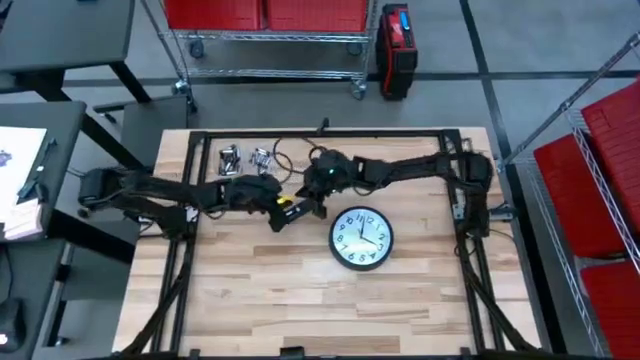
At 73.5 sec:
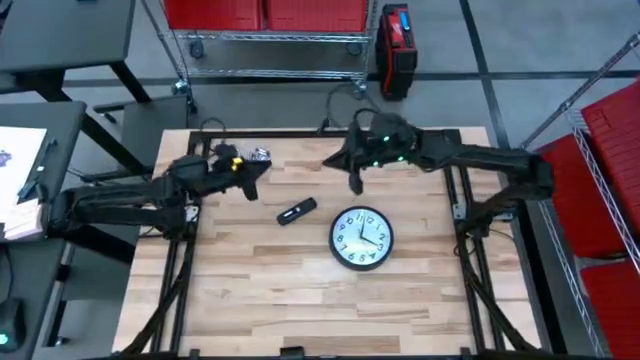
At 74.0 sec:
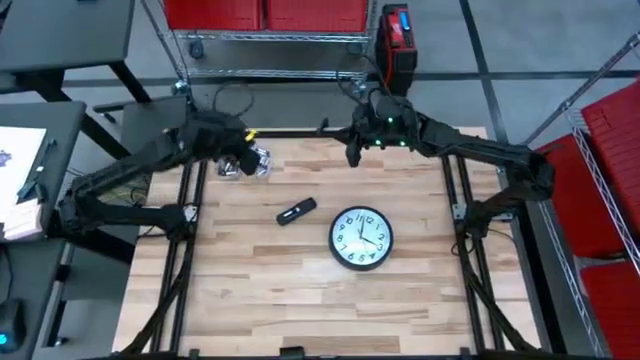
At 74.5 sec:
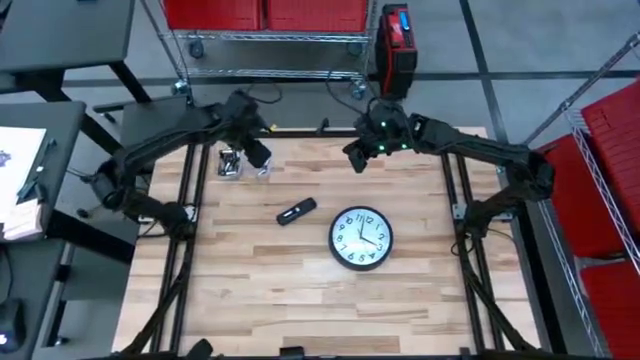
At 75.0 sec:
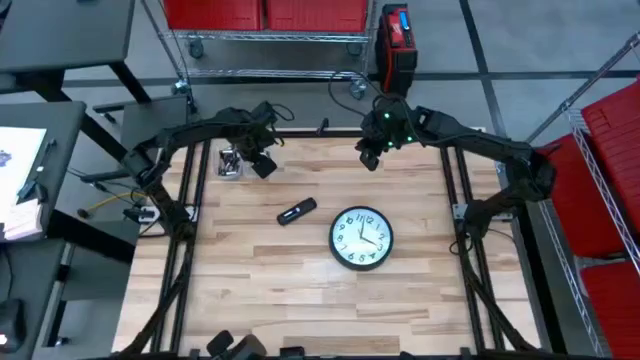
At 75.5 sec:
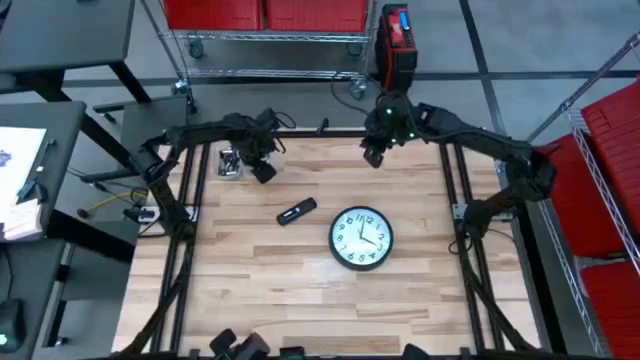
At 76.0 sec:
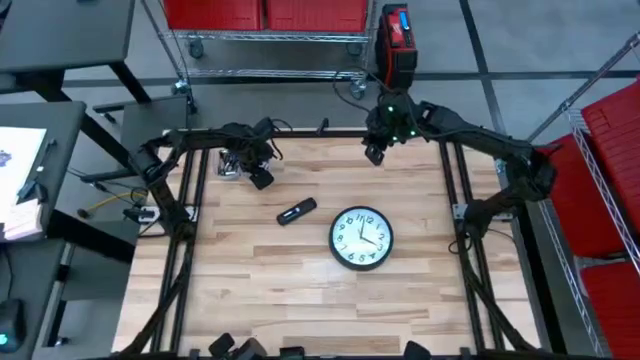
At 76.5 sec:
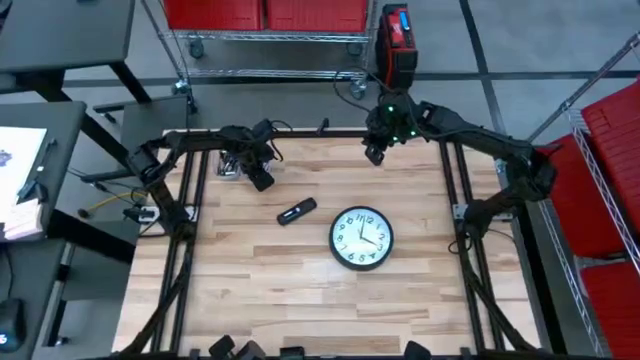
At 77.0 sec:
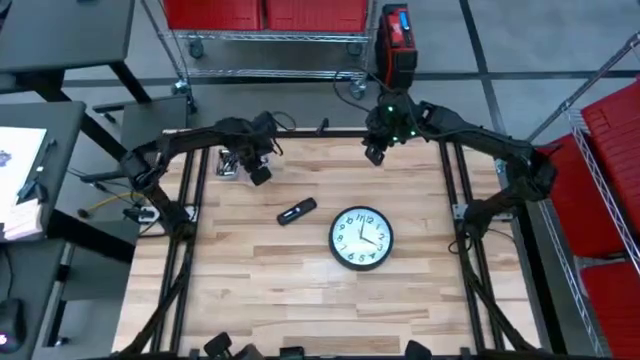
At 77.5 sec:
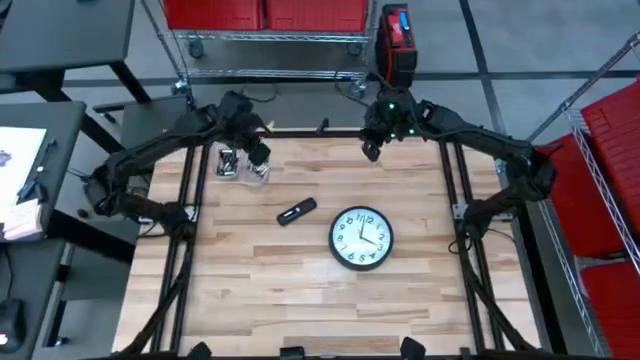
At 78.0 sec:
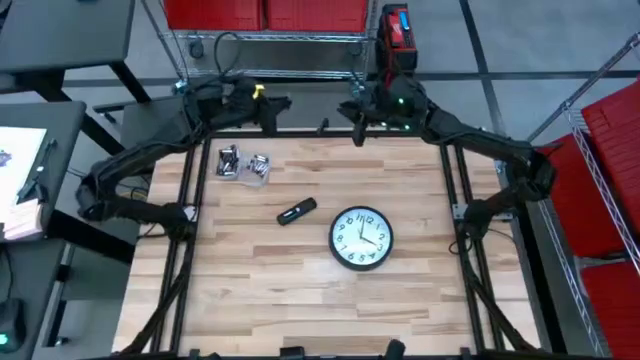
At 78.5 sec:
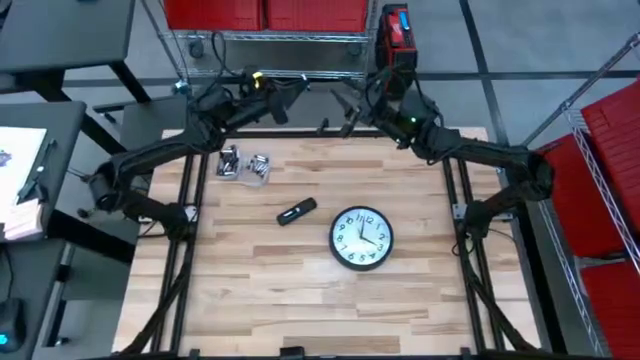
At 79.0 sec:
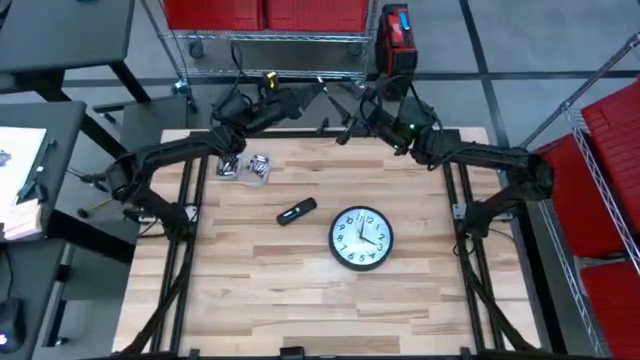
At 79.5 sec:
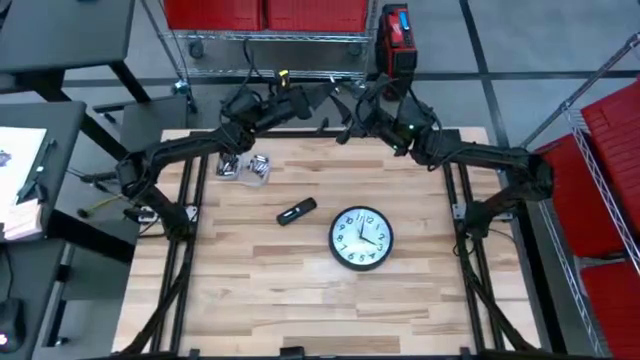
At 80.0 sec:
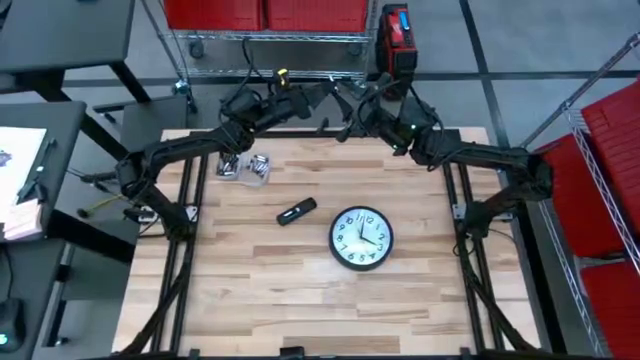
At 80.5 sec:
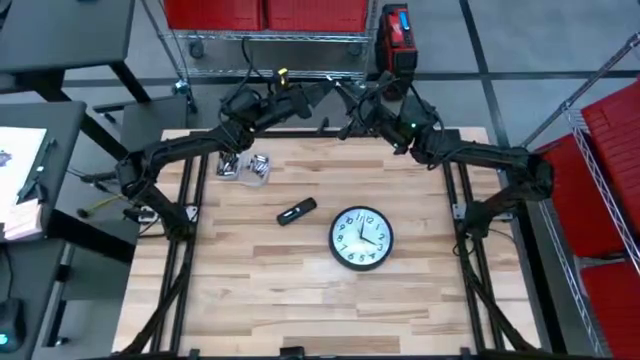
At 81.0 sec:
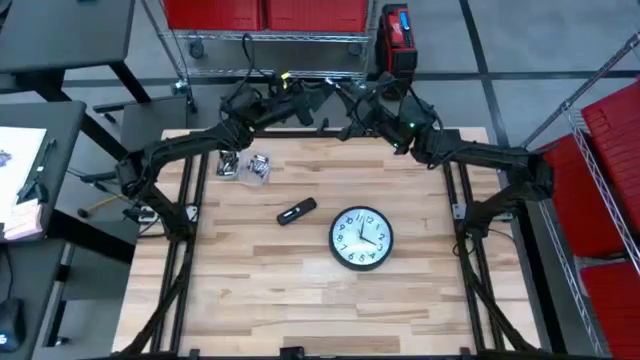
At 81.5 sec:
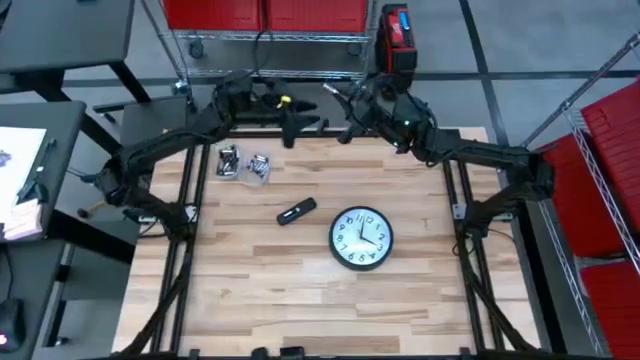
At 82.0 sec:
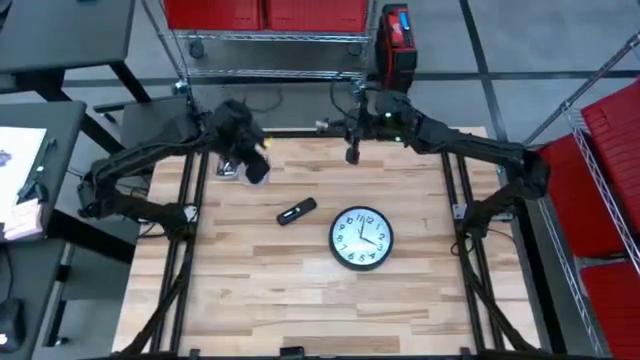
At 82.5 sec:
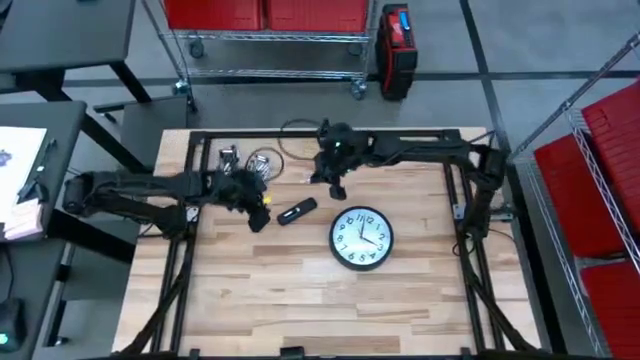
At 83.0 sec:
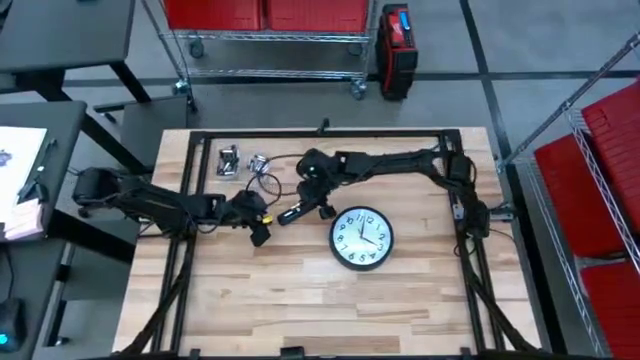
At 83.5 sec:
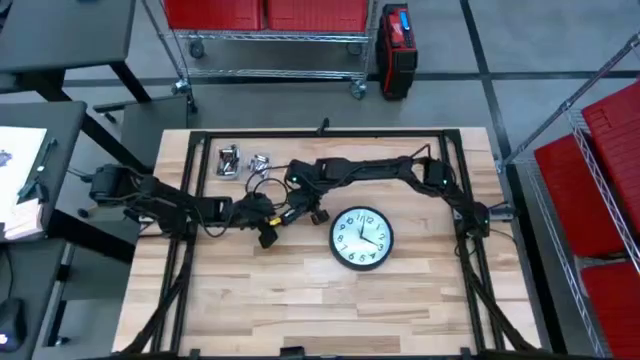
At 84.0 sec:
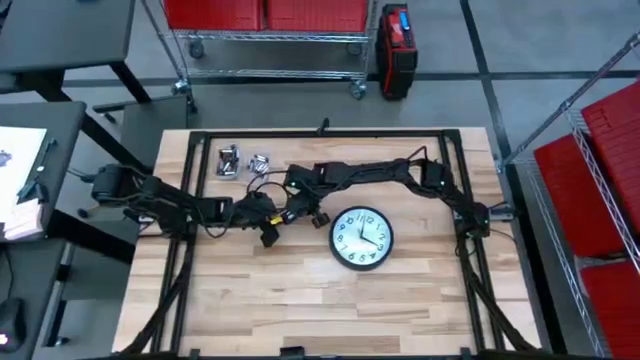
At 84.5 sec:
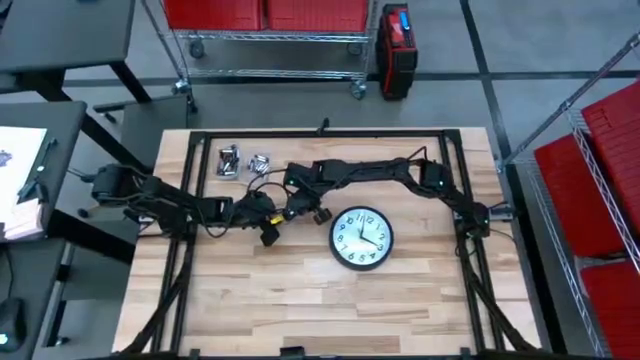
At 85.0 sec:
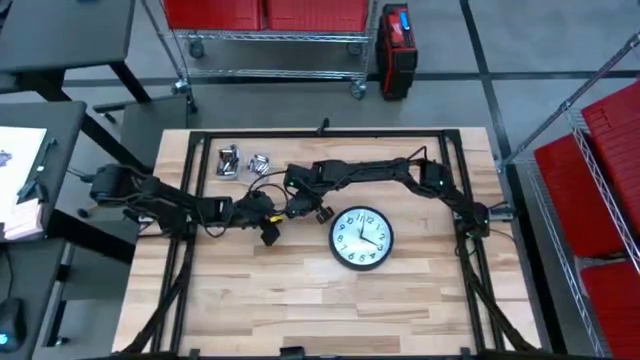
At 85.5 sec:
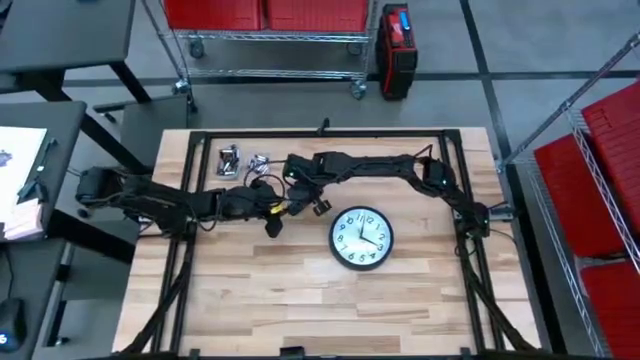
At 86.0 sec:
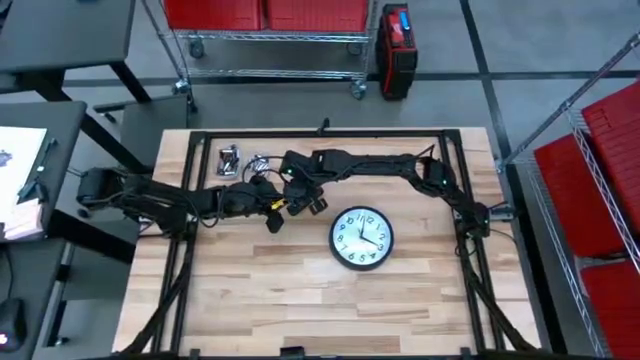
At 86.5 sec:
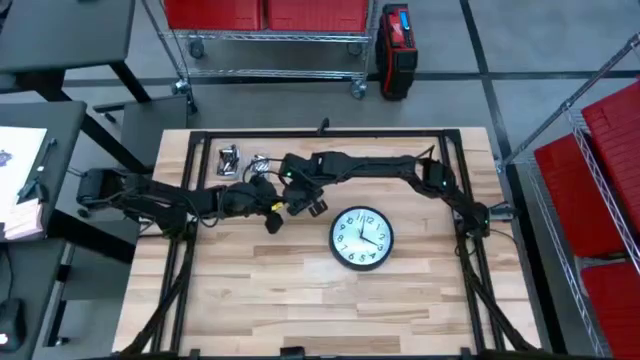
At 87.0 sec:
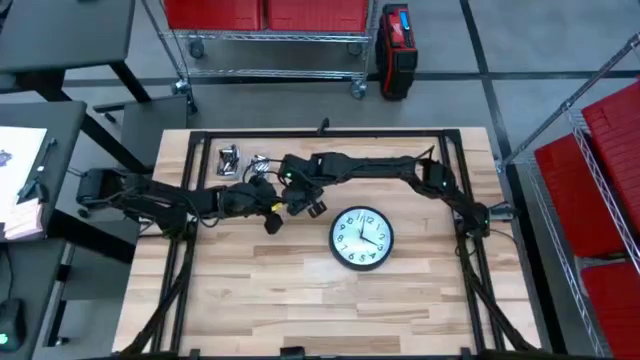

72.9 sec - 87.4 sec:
Task: Insert battery
Insert the silver battery into the remote
